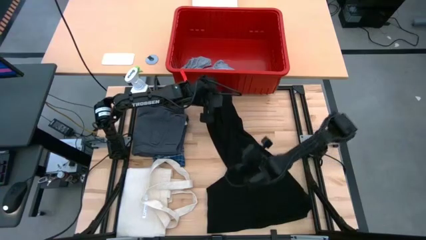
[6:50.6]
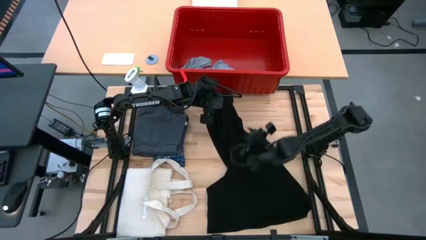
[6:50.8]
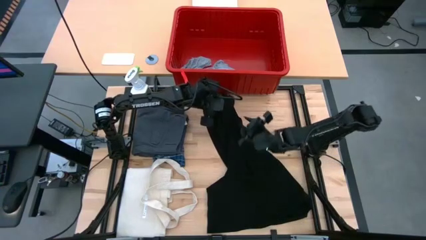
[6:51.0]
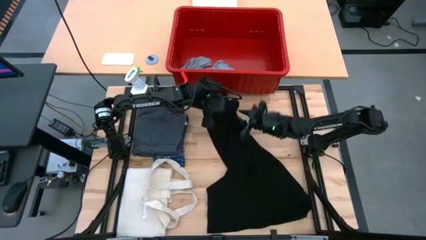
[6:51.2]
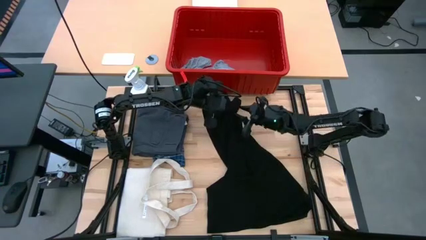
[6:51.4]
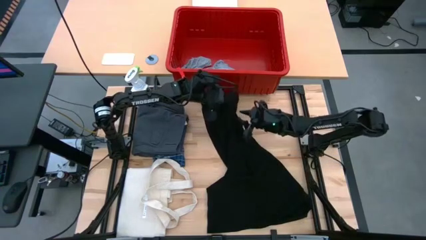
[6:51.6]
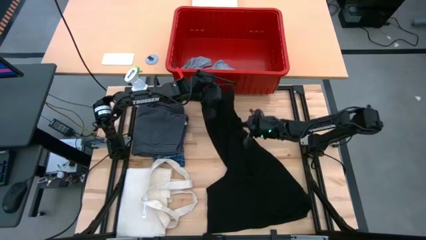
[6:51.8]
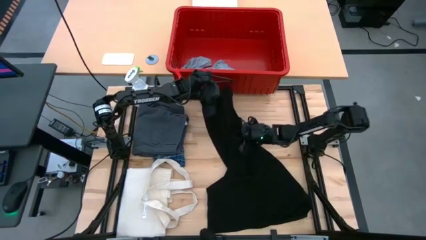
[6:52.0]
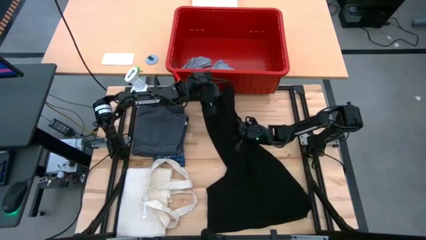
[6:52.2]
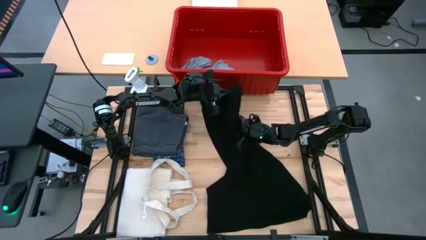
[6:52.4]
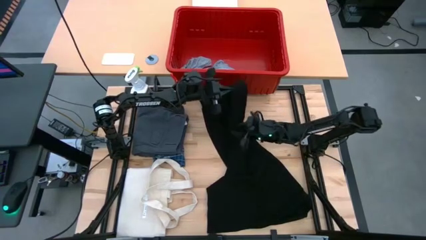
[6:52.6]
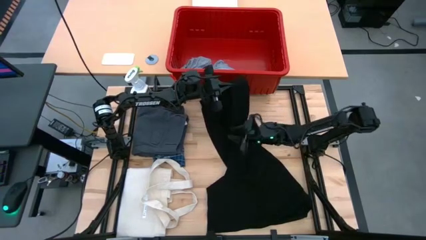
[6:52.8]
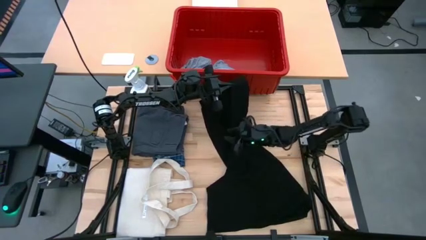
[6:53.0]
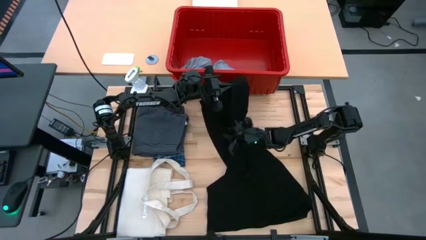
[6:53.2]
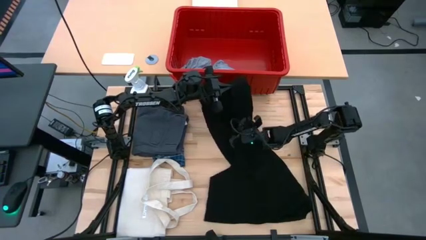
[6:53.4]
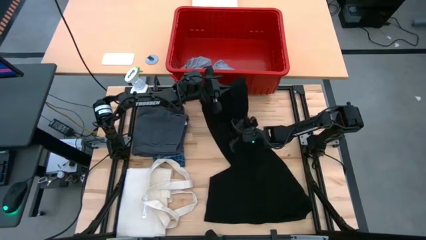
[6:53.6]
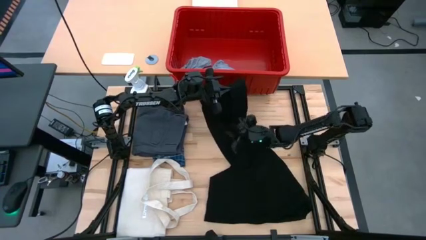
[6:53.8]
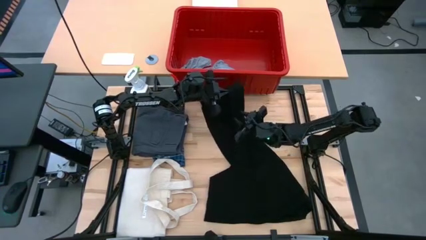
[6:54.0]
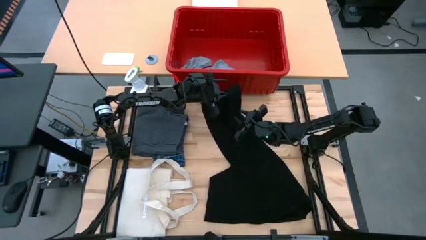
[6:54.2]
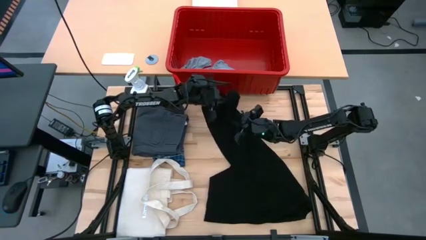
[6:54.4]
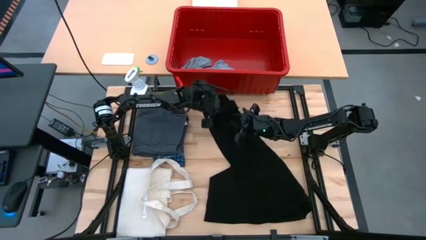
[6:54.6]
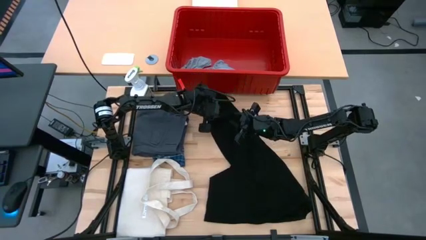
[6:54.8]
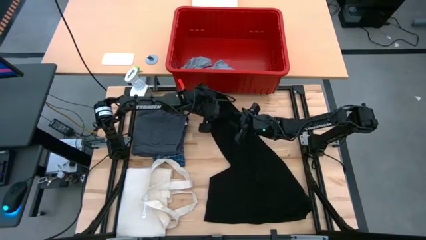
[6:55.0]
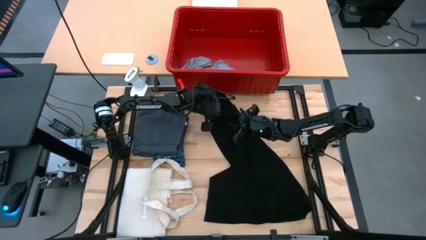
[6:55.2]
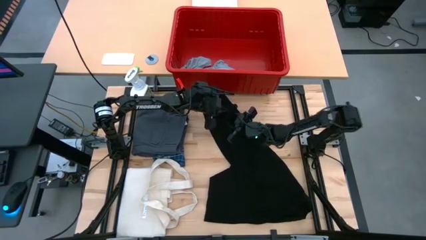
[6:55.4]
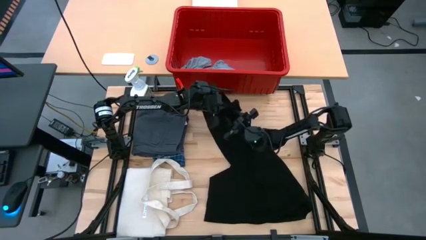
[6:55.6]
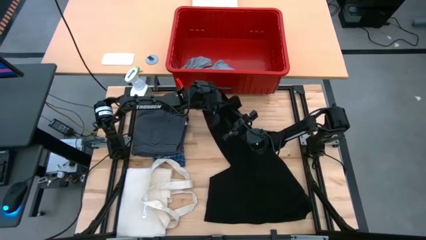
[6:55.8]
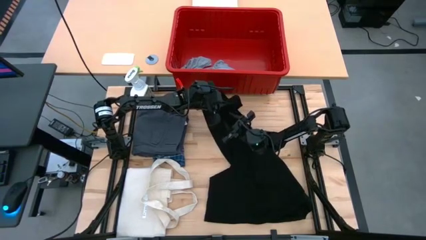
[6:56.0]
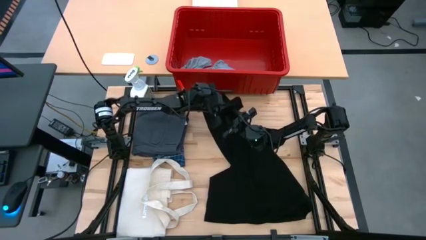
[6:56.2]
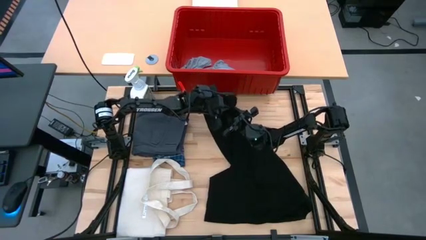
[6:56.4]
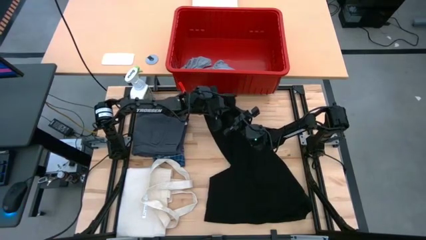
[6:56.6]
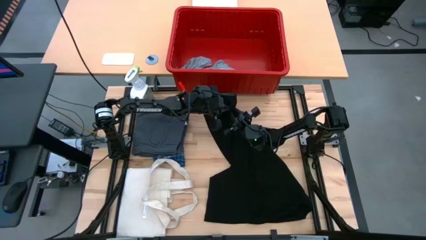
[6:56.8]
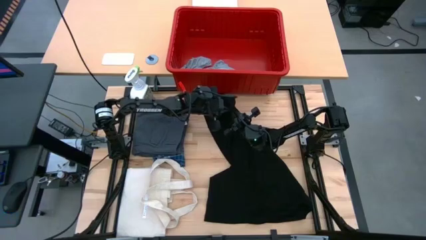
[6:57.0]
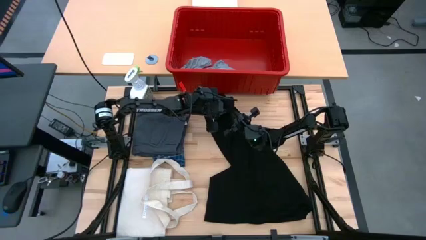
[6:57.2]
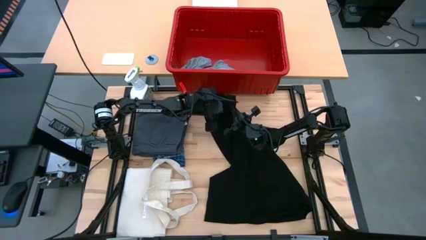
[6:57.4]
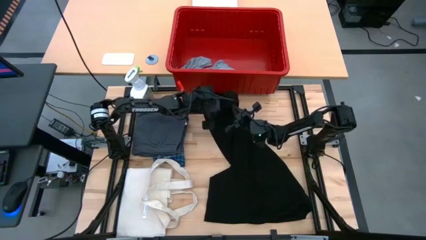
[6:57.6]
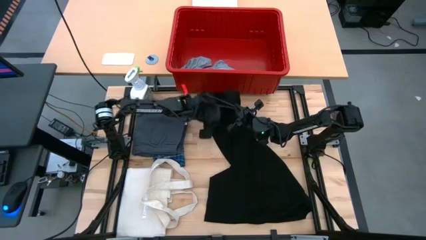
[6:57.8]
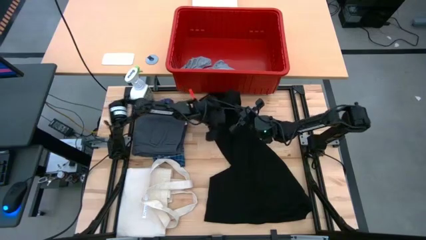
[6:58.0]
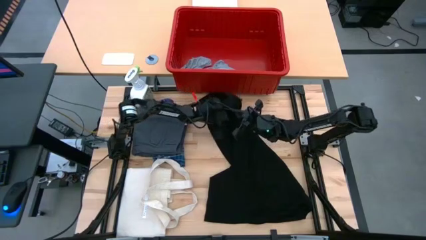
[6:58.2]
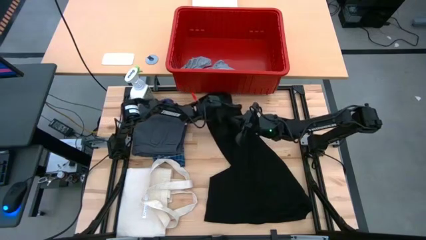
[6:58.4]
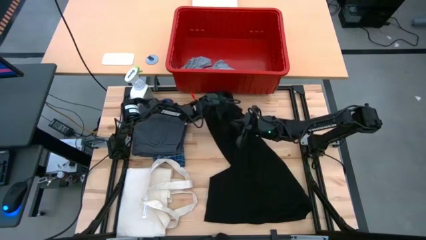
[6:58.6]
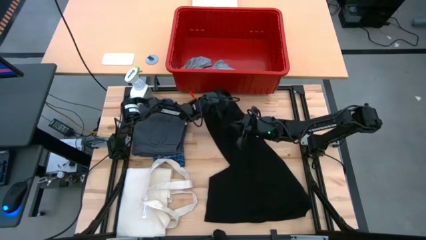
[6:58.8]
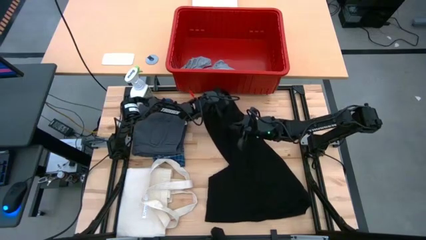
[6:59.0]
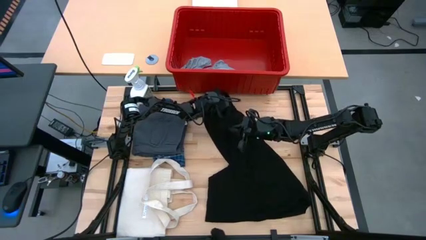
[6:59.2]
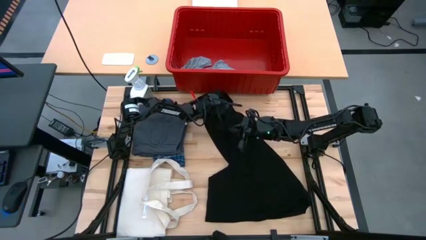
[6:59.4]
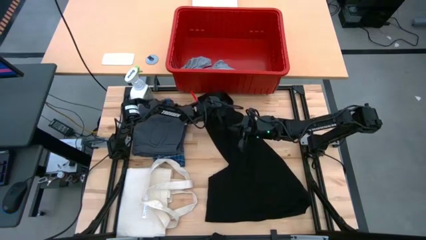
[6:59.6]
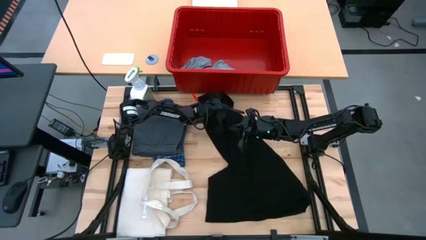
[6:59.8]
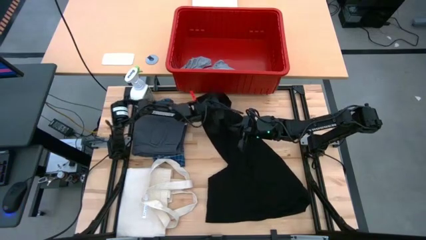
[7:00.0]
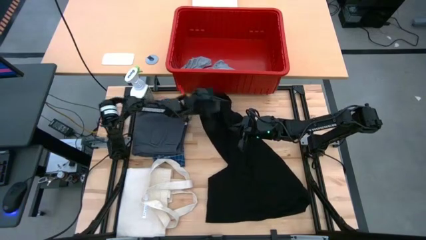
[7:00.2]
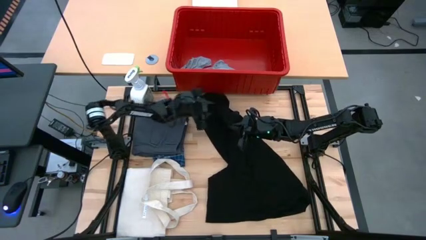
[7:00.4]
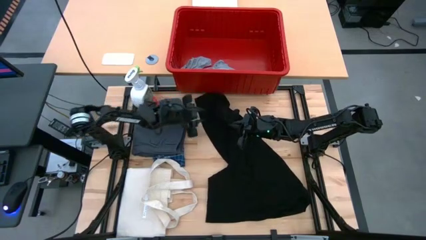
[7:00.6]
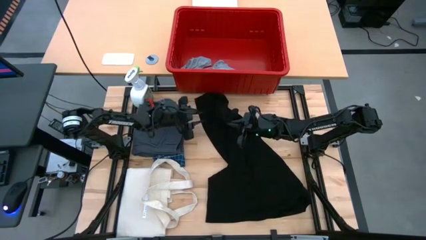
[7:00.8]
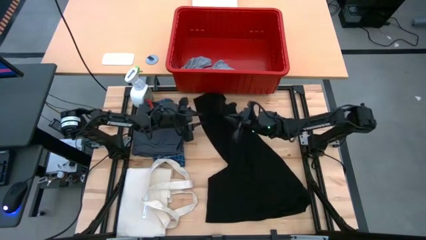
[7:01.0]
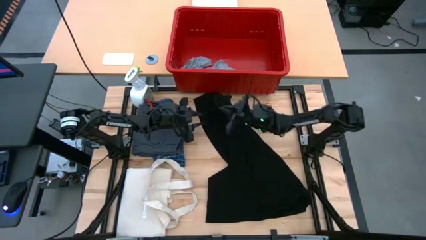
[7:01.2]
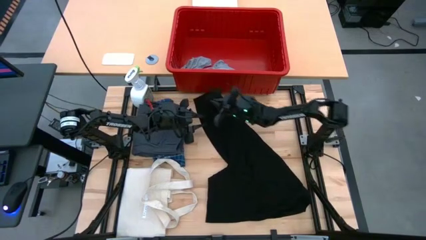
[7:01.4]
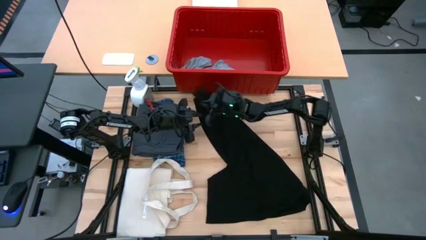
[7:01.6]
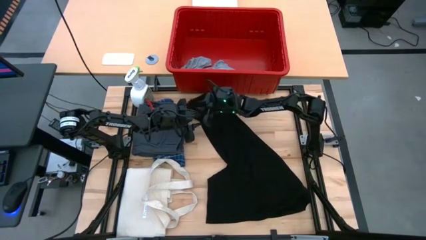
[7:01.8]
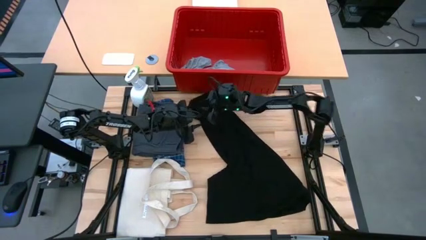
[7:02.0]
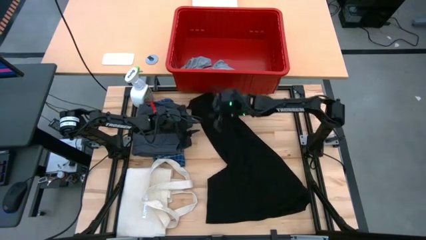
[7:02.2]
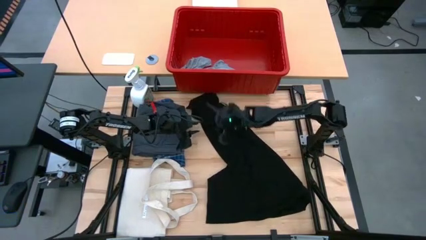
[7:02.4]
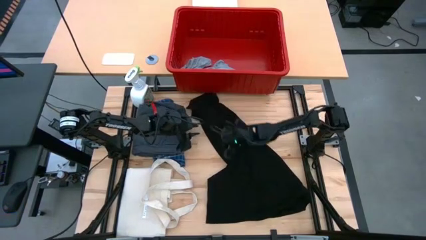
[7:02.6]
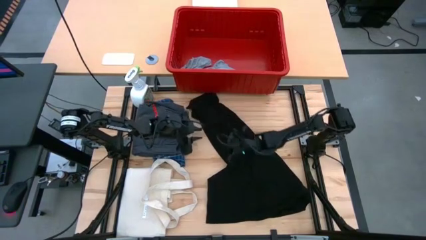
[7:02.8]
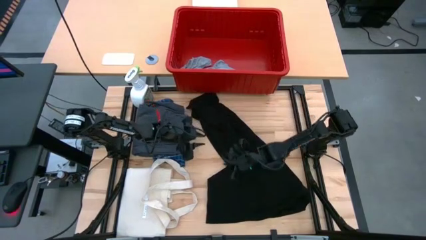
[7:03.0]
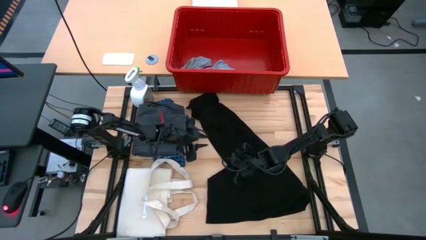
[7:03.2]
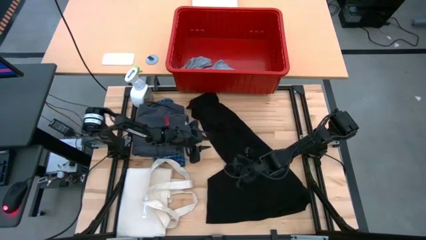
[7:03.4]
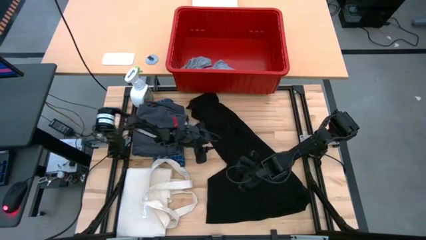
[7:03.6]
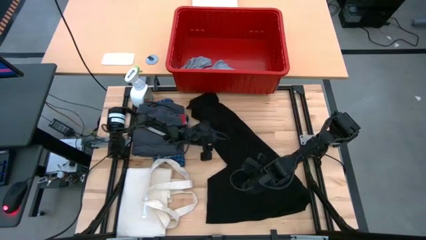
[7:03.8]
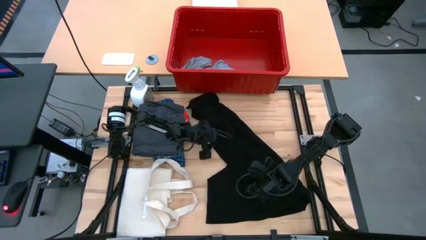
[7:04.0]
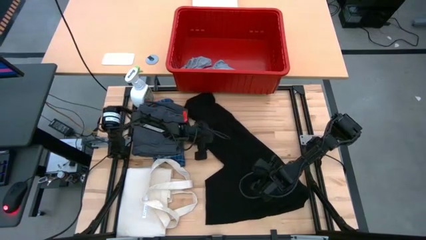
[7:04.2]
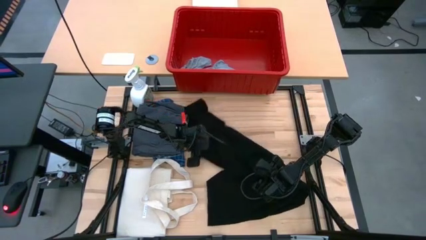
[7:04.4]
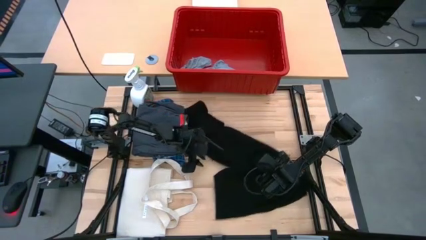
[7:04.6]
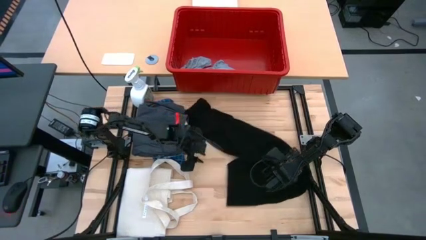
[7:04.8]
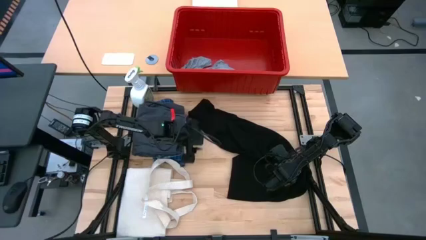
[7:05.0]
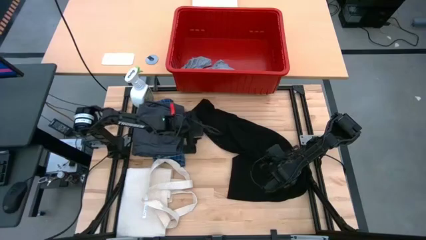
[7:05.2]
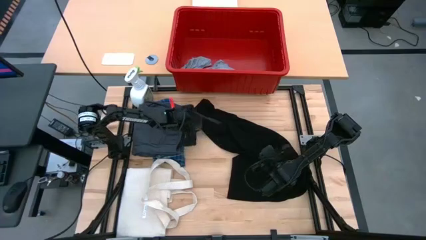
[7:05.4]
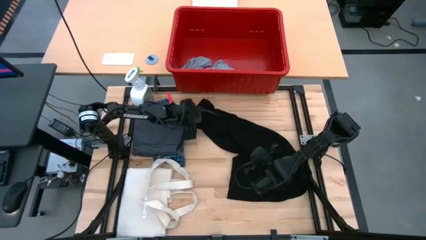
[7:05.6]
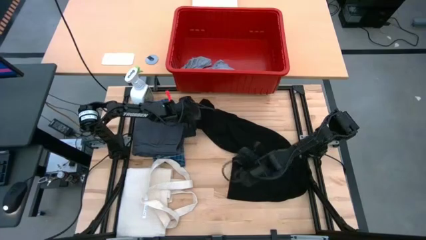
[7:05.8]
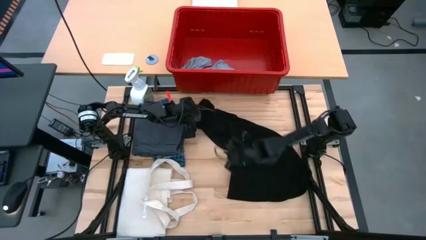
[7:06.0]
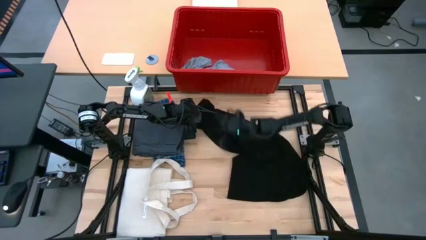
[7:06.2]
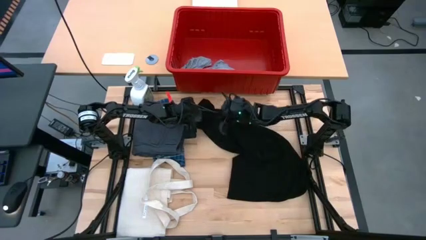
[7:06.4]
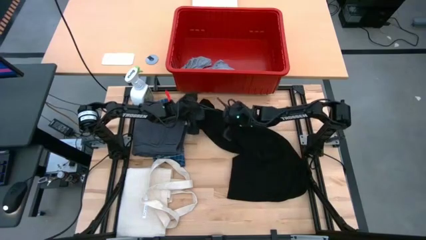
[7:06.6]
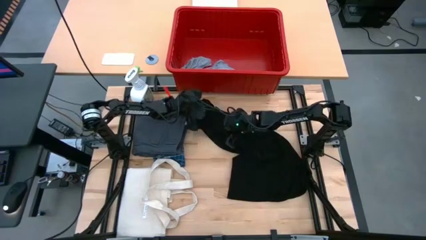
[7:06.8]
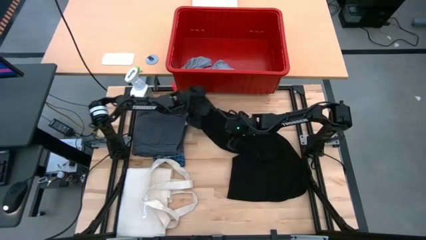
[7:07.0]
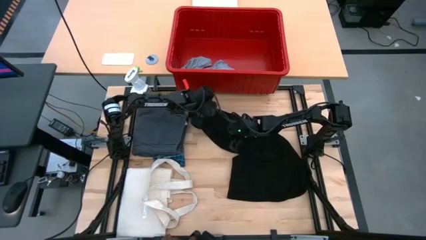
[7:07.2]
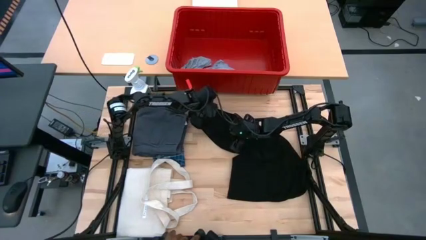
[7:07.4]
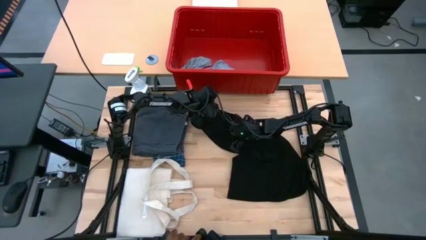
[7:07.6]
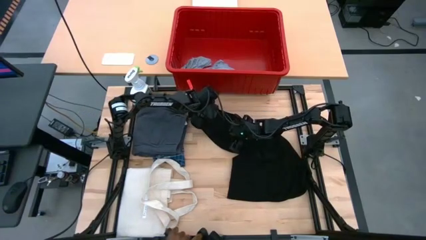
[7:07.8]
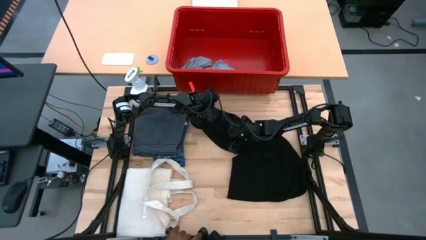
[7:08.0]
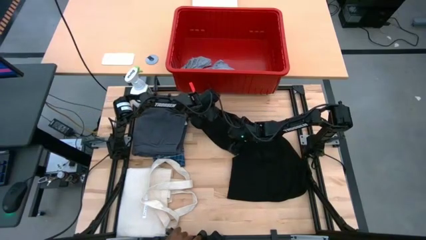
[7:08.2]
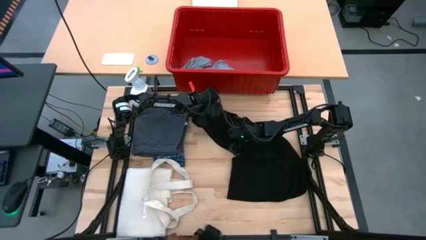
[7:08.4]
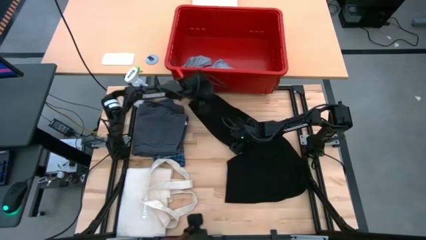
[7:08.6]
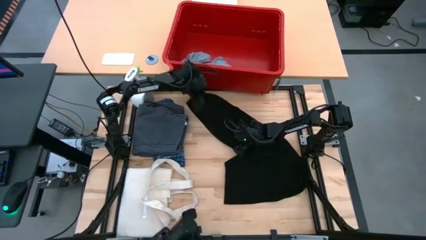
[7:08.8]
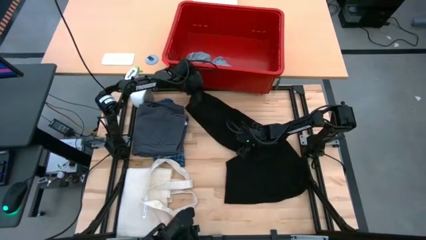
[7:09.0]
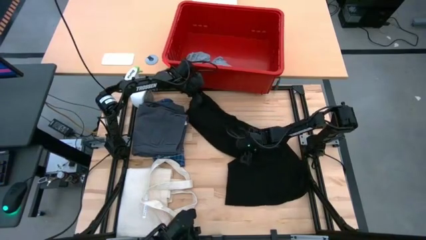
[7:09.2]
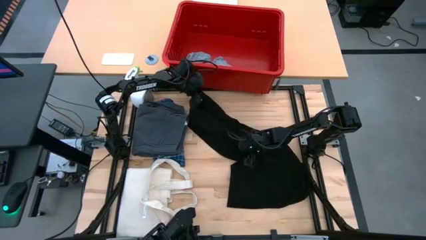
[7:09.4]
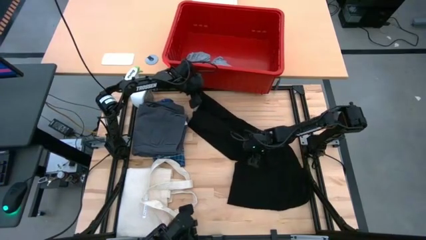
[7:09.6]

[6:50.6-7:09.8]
Task: Fold Laundry from Bin
Fold the black shirt
